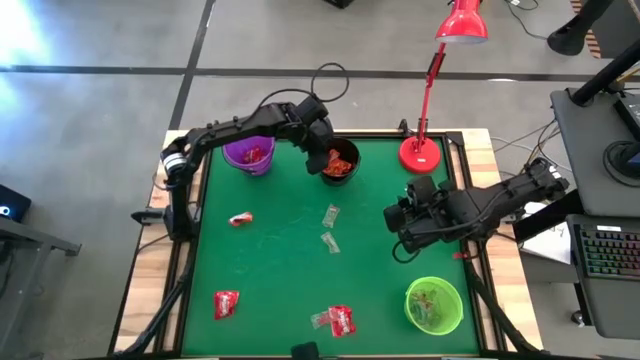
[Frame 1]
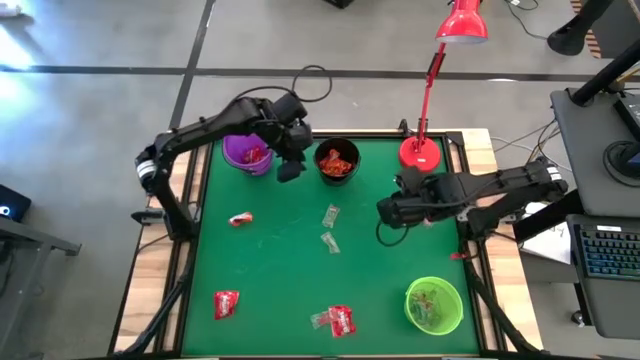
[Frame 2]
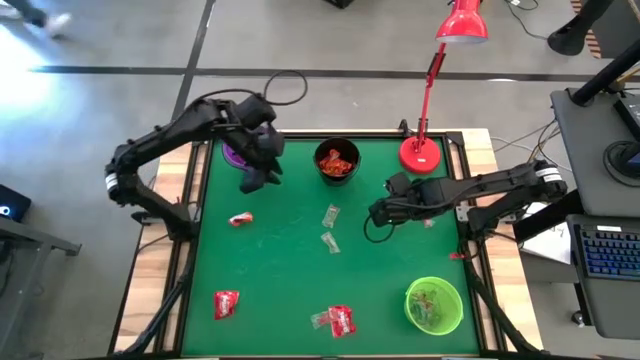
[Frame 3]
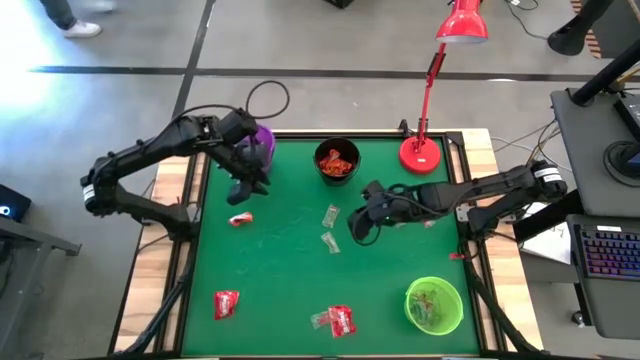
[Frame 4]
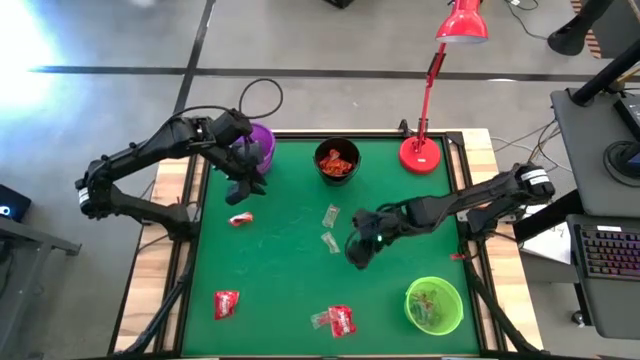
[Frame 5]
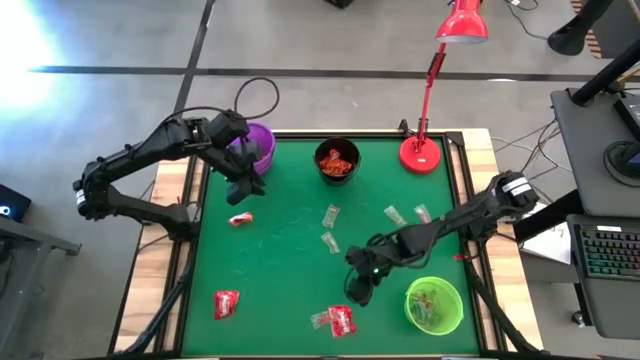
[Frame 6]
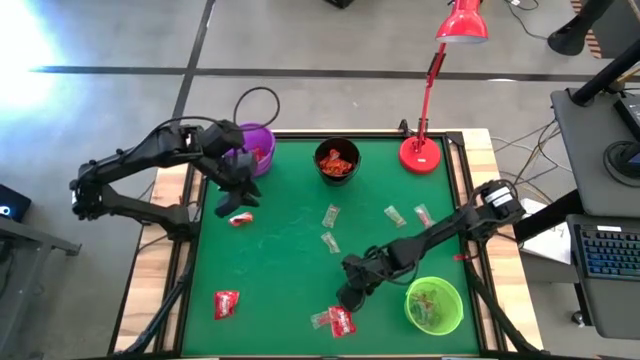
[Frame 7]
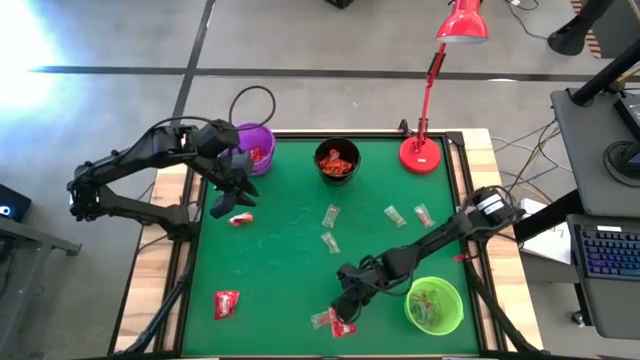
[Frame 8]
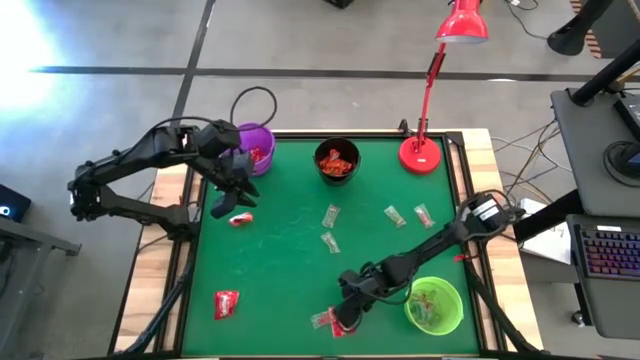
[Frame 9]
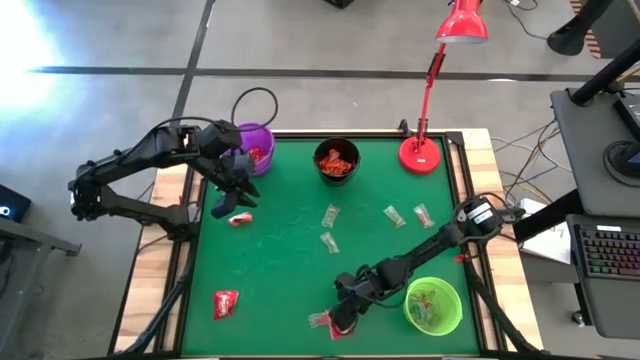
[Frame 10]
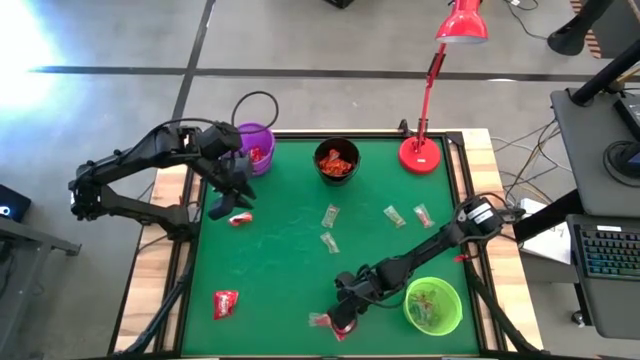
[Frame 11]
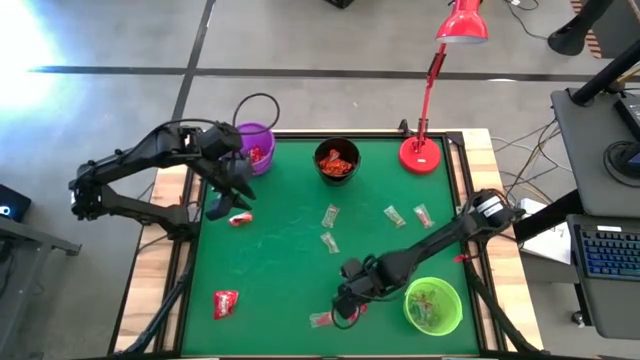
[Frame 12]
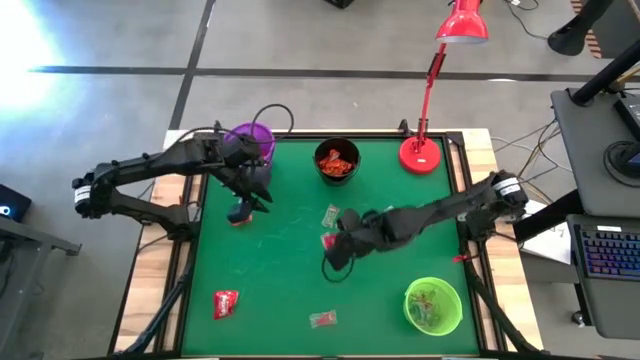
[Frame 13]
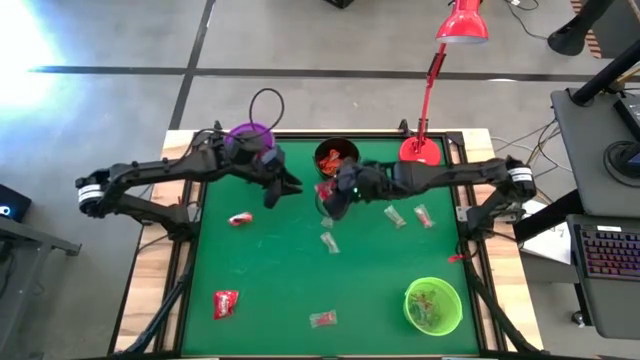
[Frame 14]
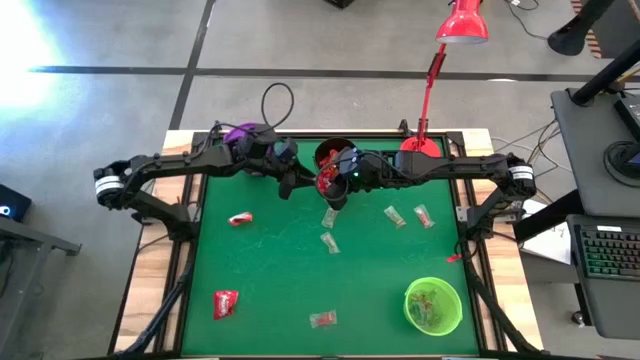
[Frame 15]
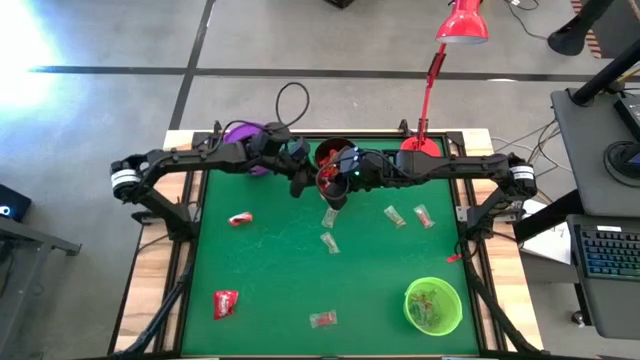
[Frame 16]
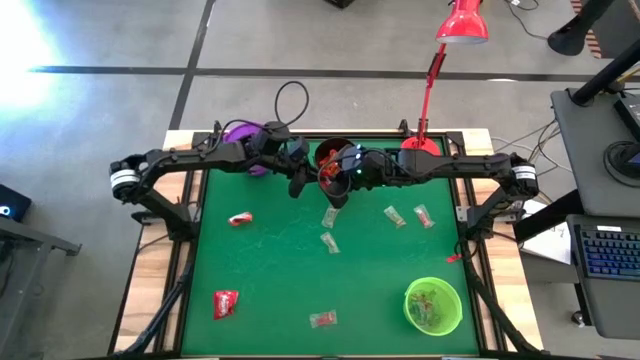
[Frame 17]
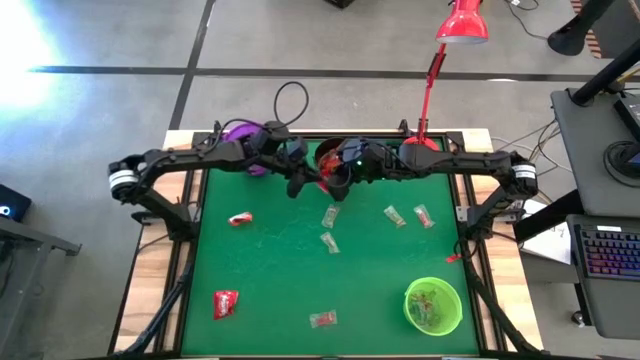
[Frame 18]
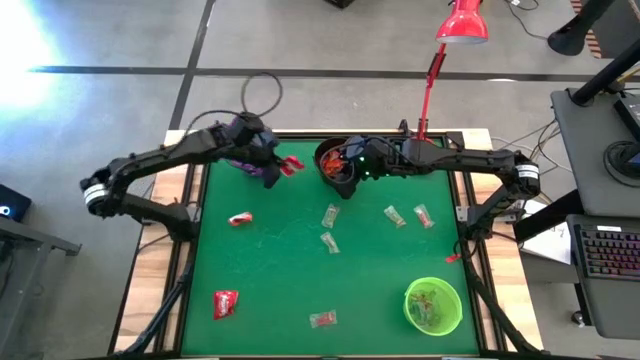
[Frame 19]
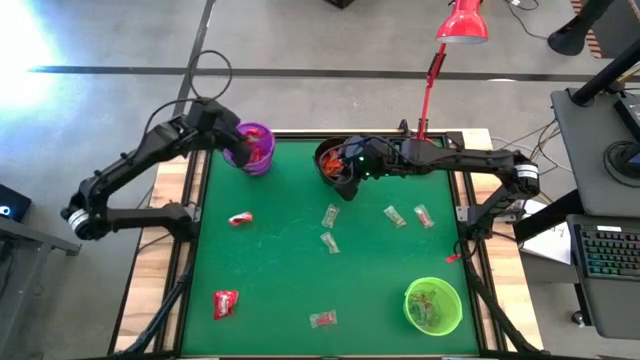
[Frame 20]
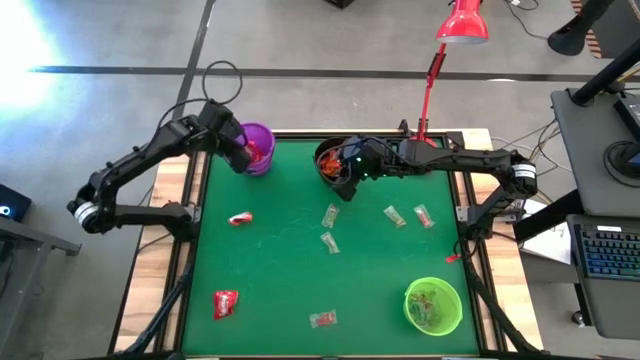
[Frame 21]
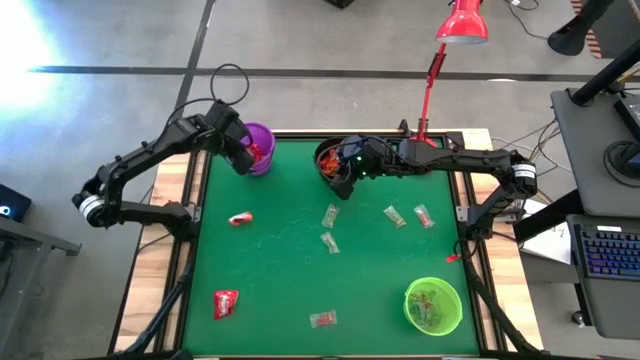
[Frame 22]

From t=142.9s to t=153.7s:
Task: Sort candy
Put the red candy into the purple bucket

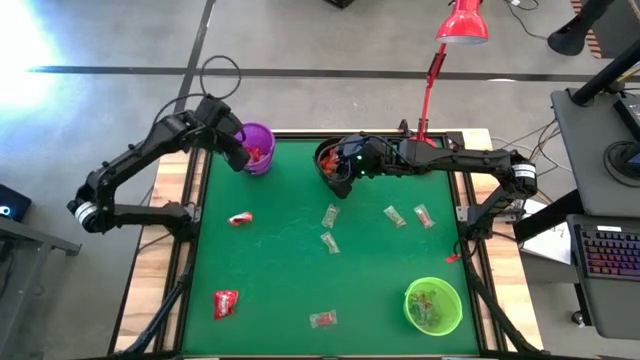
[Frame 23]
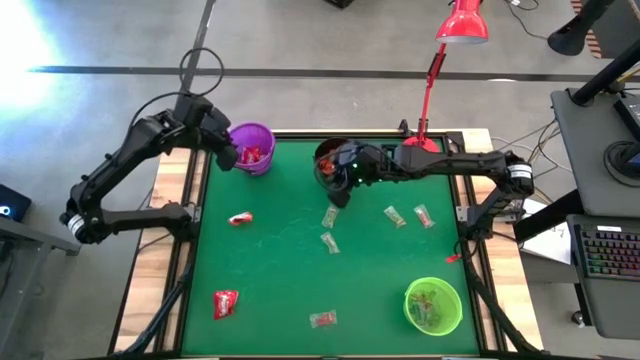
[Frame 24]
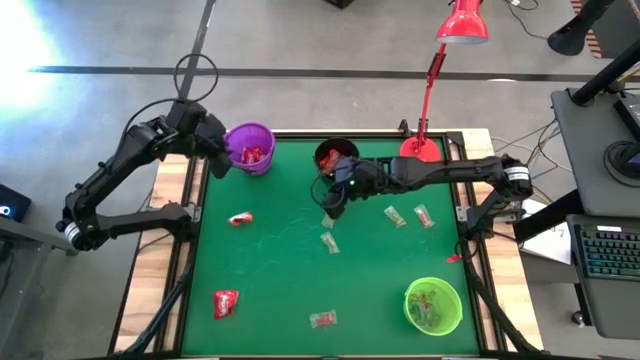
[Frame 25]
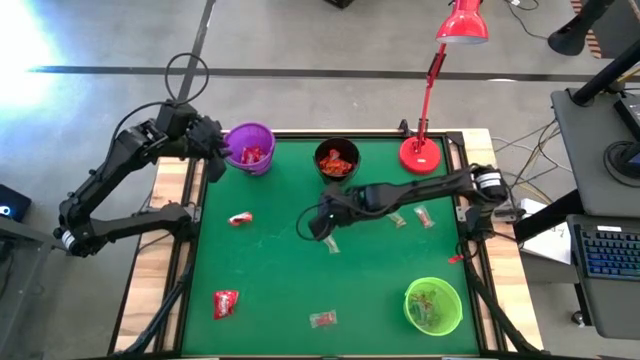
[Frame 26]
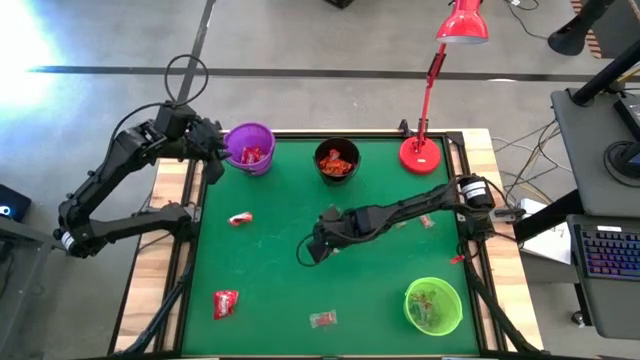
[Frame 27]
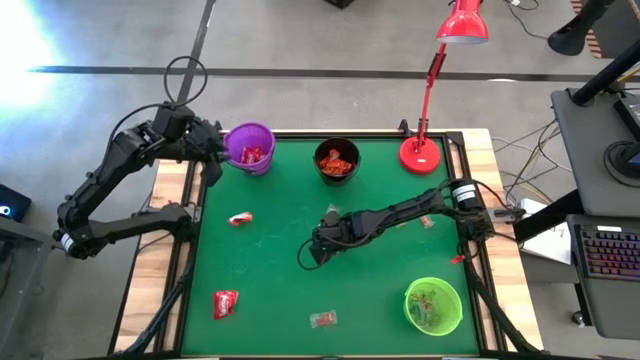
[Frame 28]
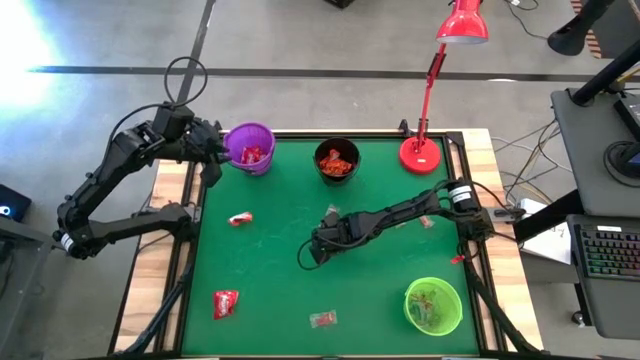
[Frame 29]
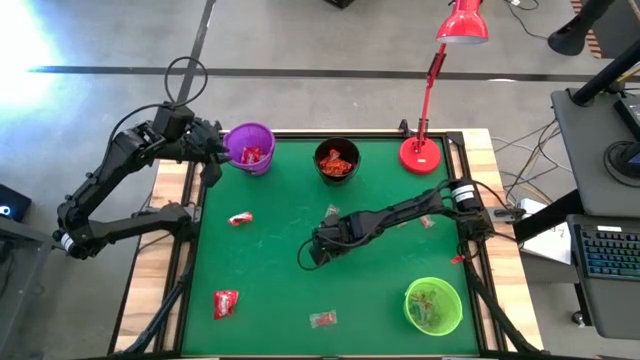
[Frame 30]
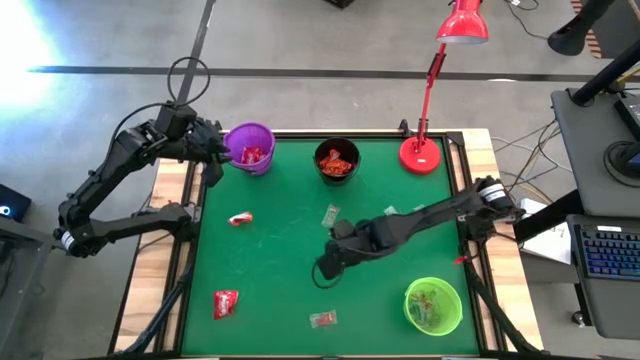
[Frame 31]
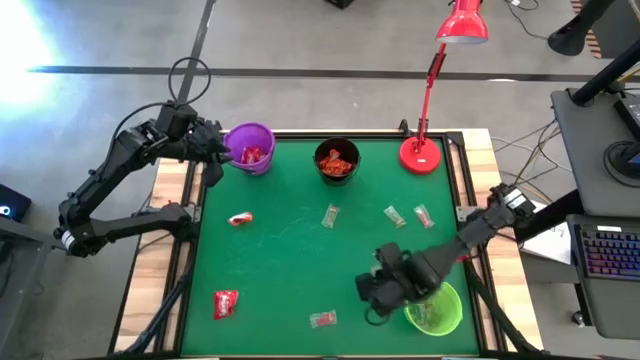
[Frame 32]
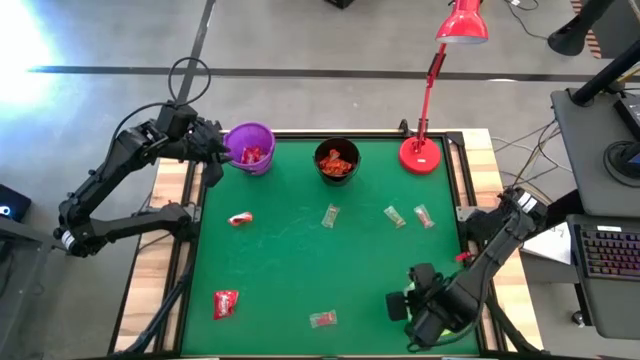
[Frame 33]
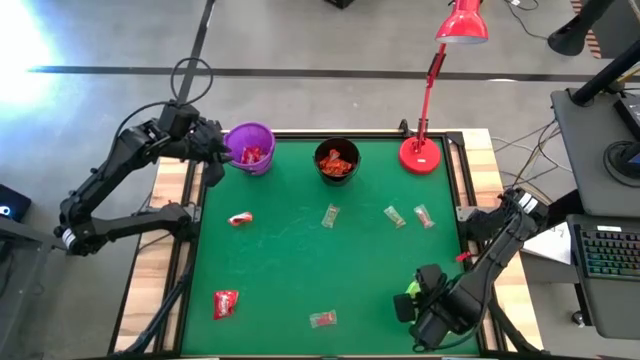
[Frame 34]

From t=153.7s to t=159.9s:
Put the green gummy into the green bucket

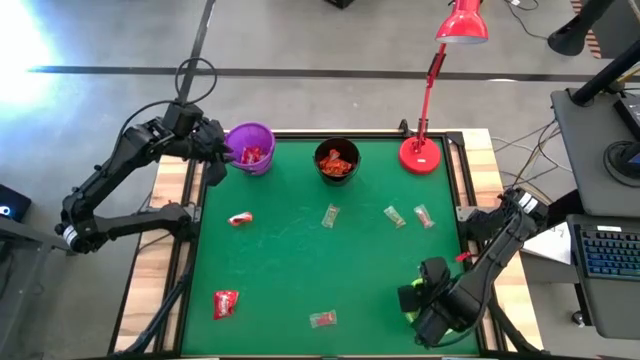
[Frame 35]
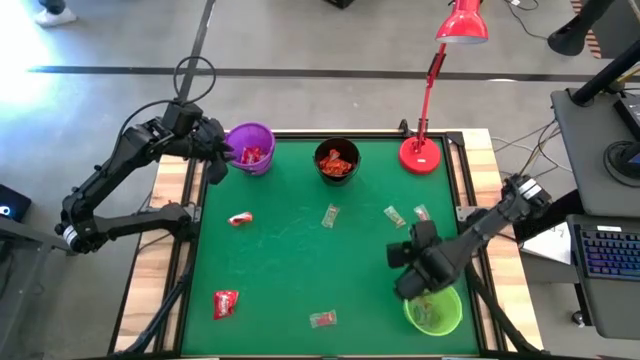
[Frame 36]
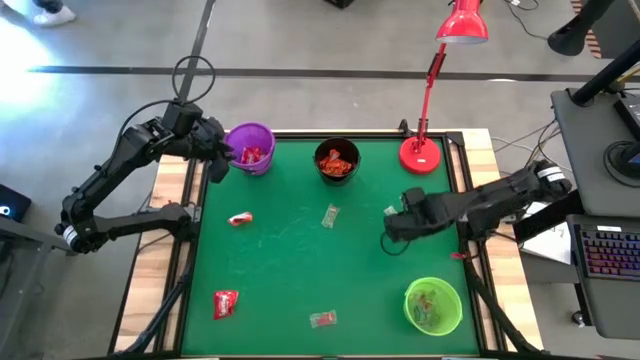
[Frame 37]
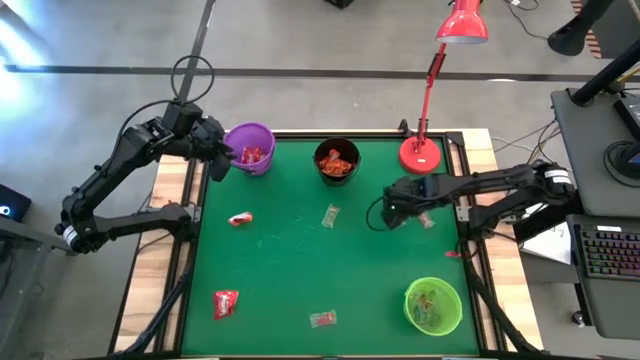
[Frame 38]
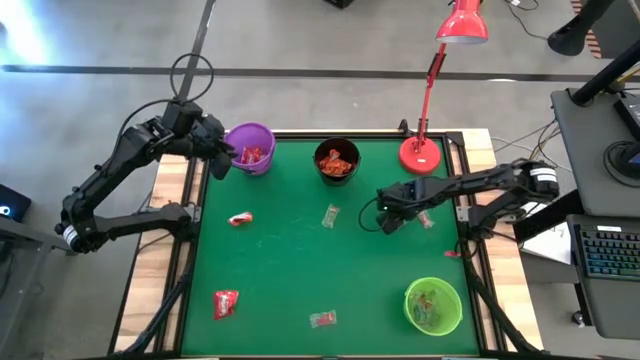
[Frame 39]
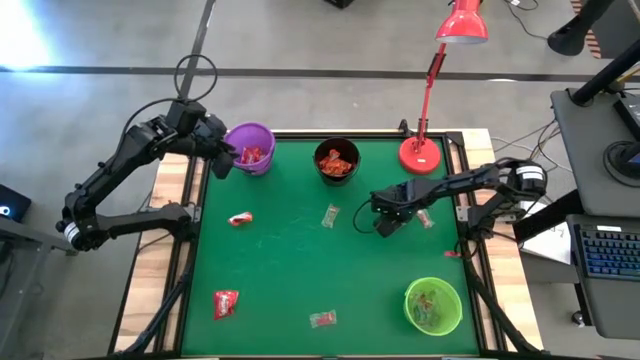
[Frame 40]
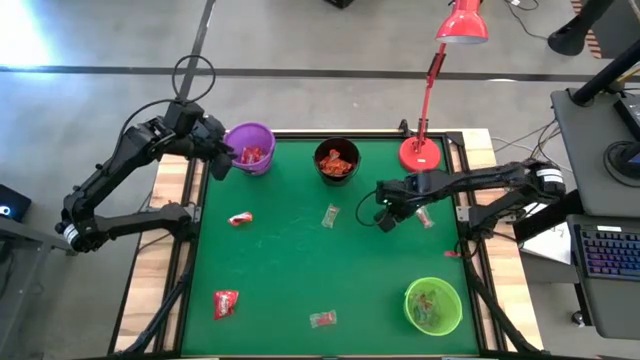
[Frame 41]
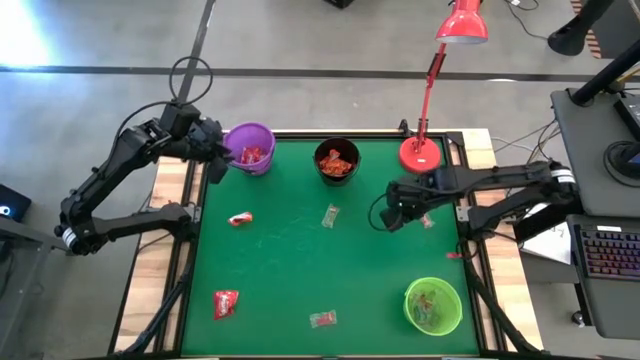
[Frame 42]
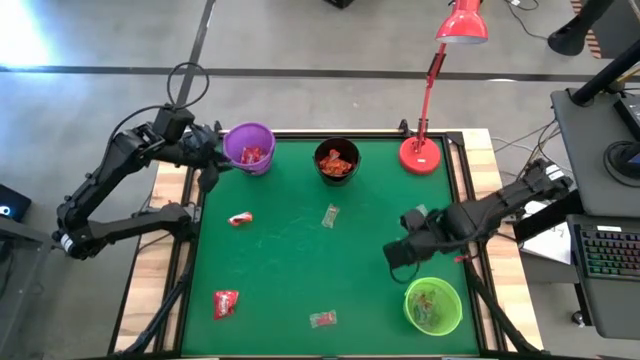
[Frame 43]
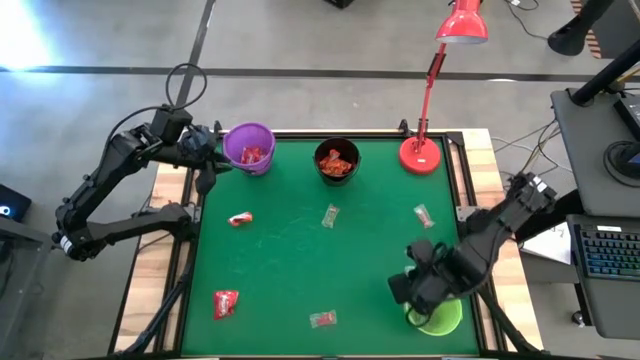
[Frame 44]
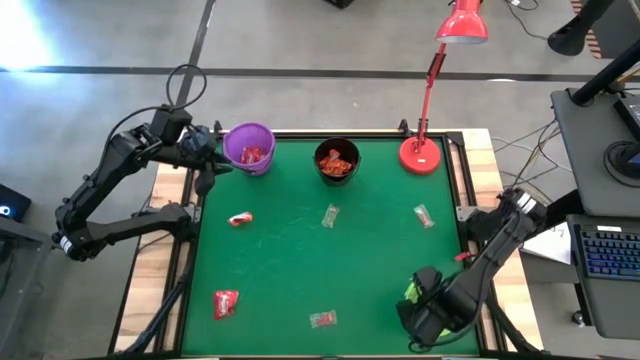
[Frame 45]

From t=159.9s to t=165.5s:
Put the green gummy into the green bucket
